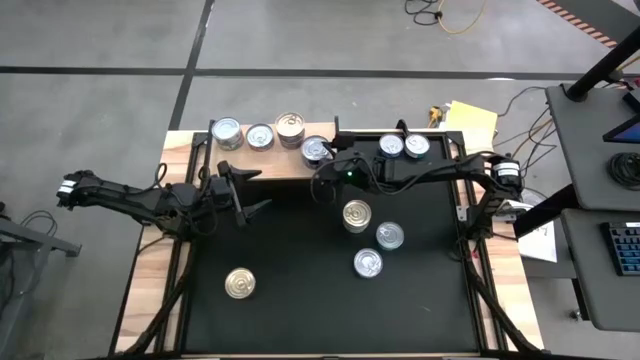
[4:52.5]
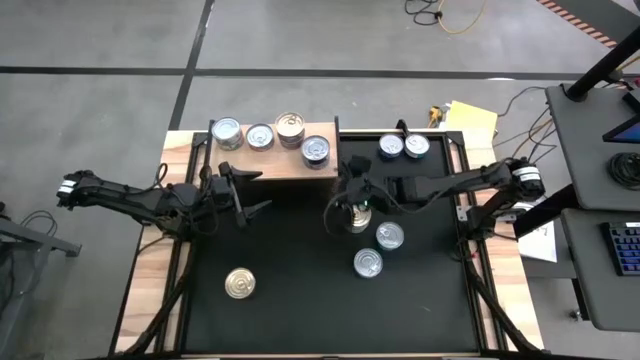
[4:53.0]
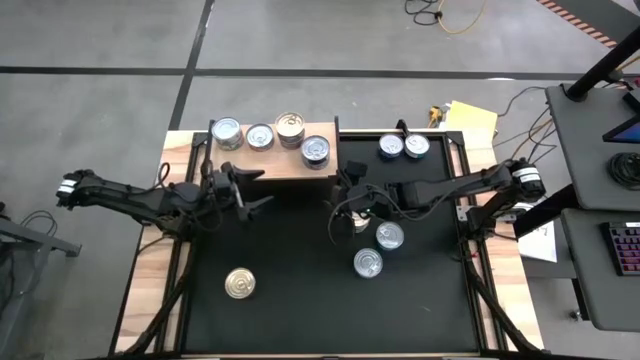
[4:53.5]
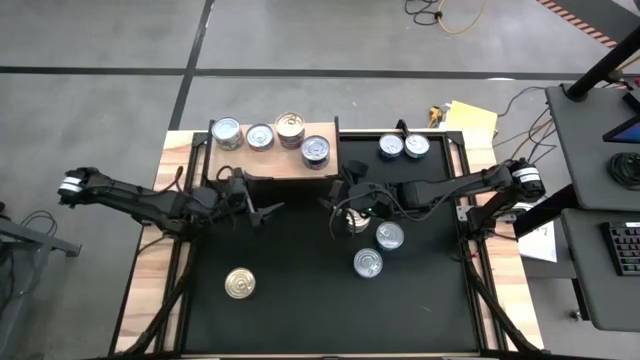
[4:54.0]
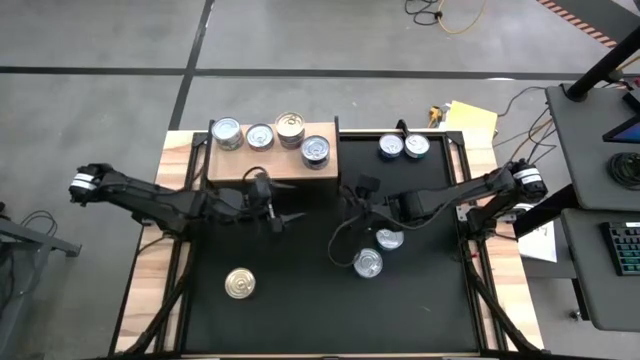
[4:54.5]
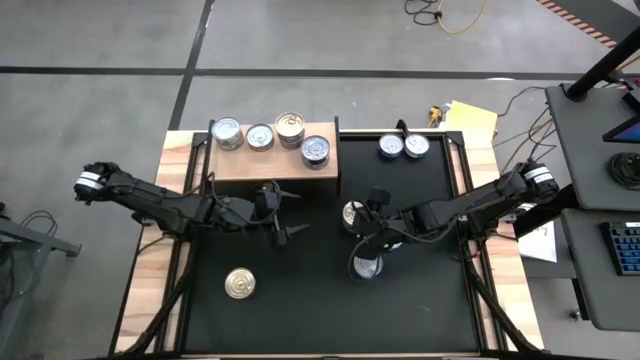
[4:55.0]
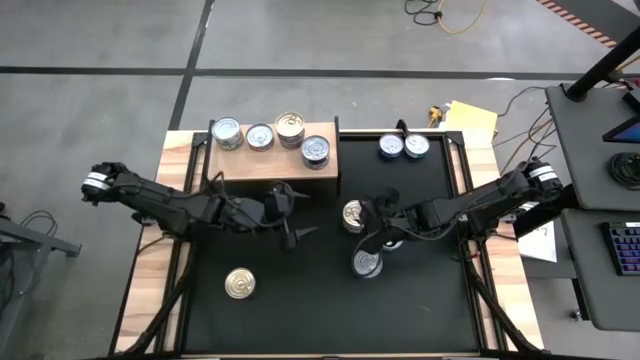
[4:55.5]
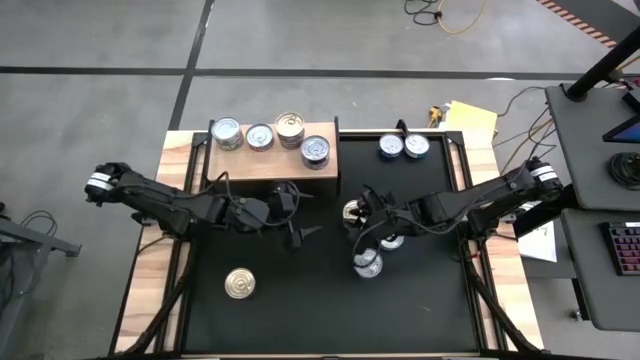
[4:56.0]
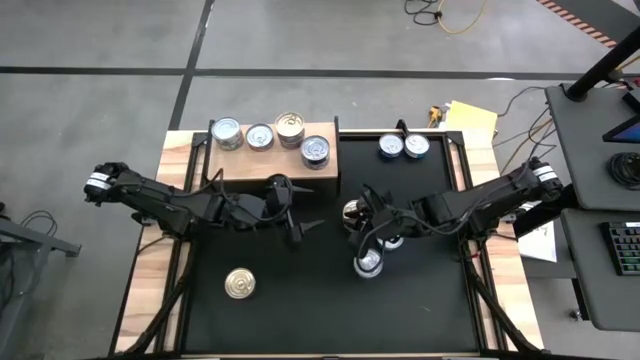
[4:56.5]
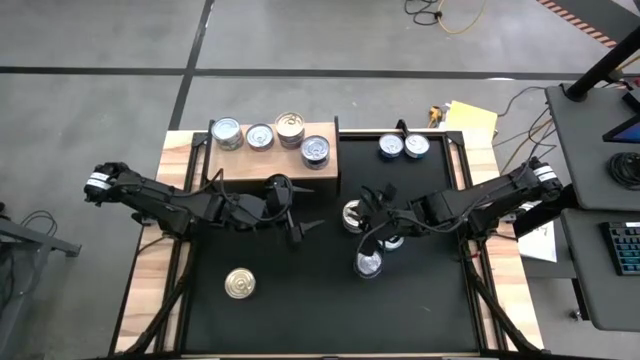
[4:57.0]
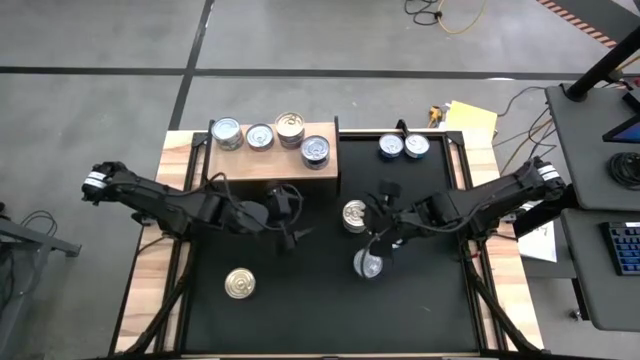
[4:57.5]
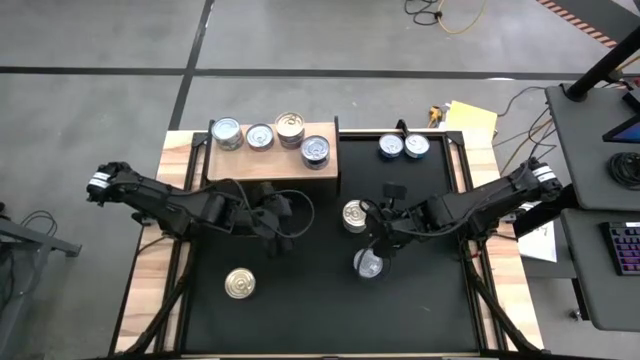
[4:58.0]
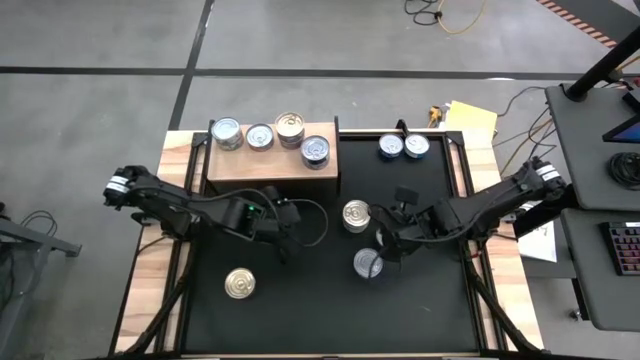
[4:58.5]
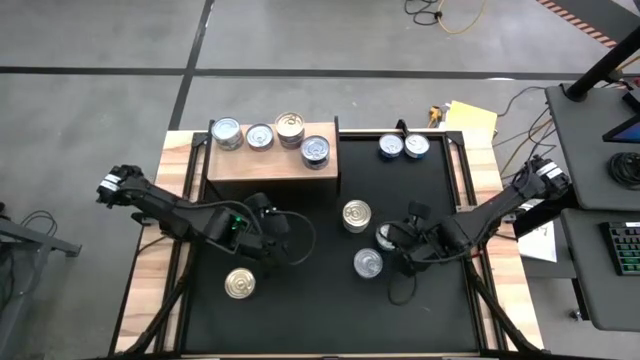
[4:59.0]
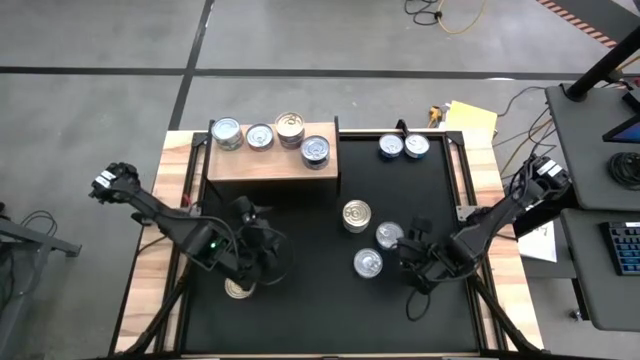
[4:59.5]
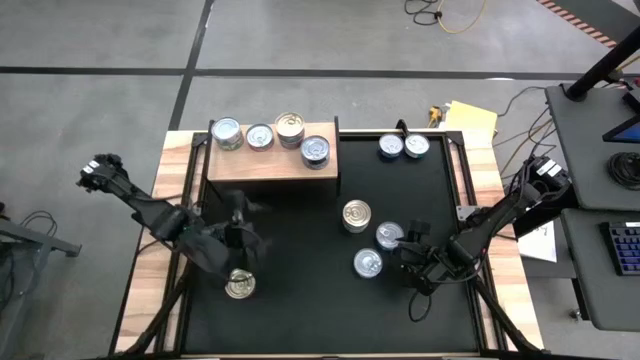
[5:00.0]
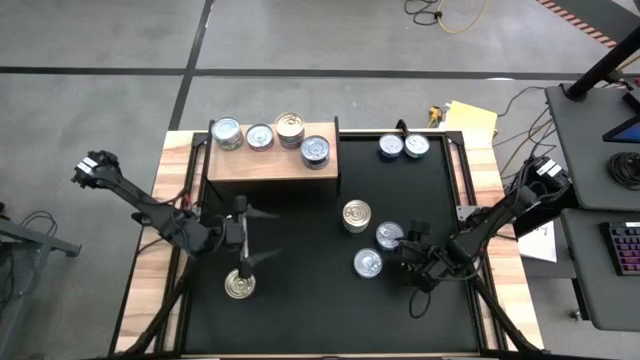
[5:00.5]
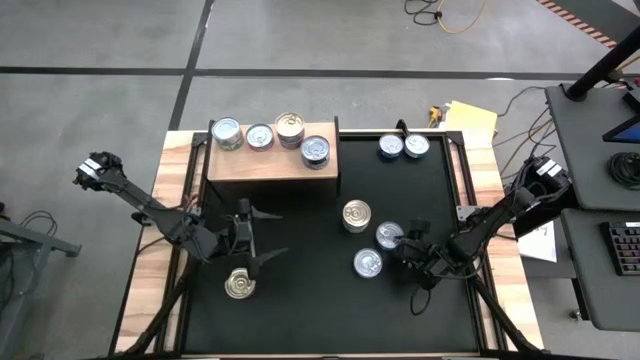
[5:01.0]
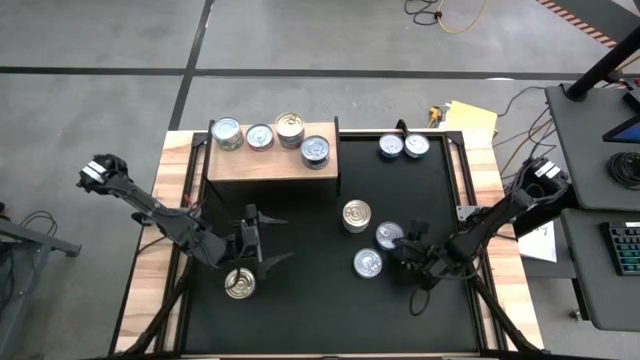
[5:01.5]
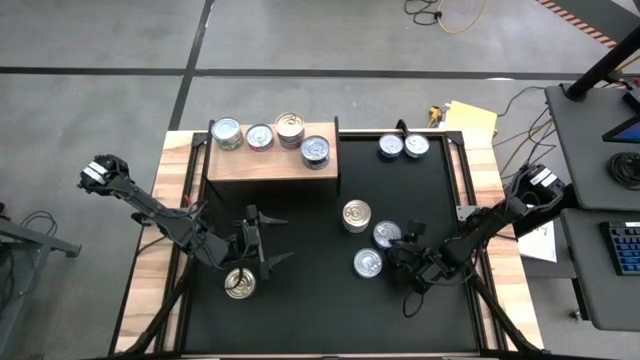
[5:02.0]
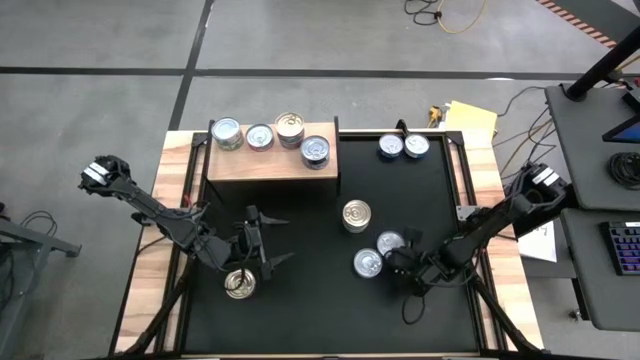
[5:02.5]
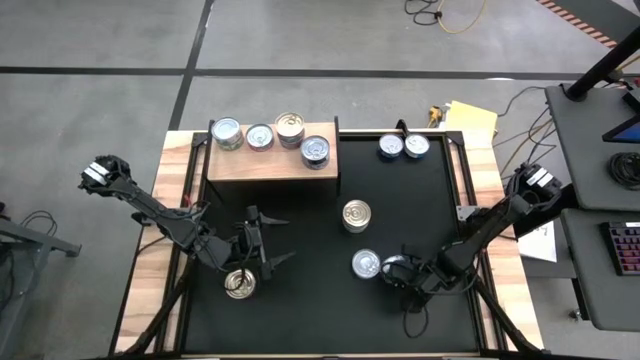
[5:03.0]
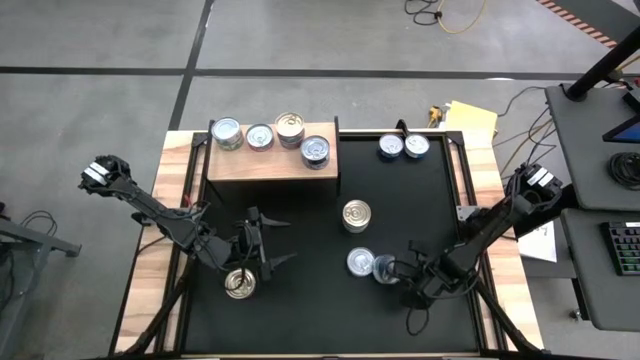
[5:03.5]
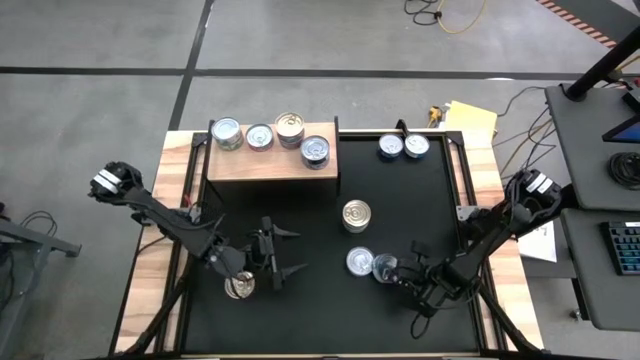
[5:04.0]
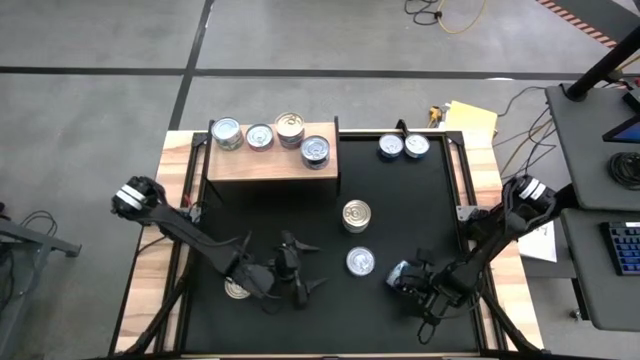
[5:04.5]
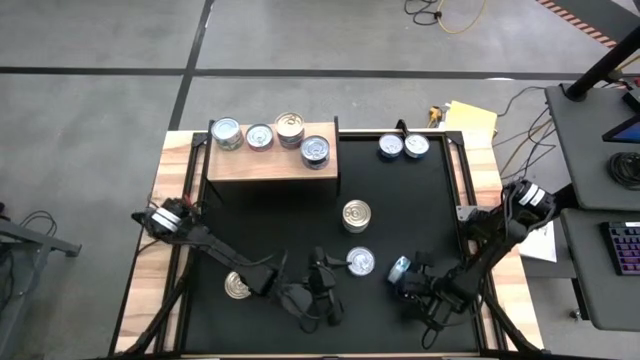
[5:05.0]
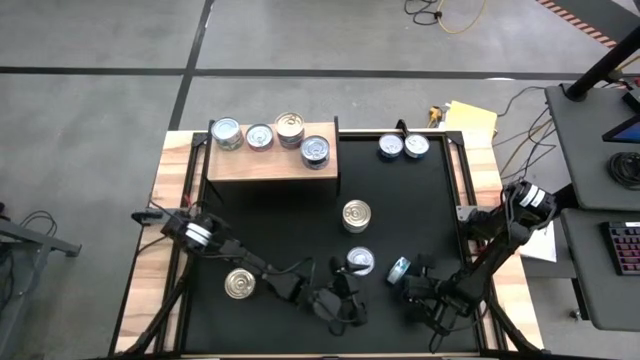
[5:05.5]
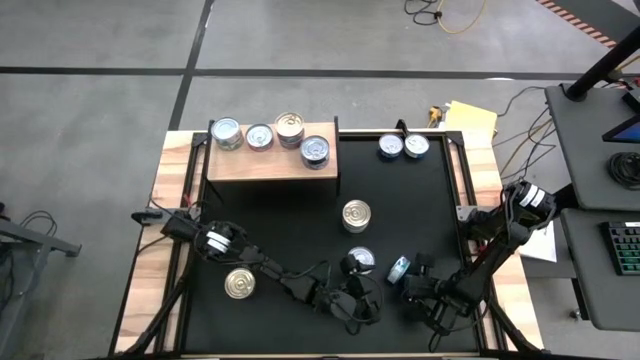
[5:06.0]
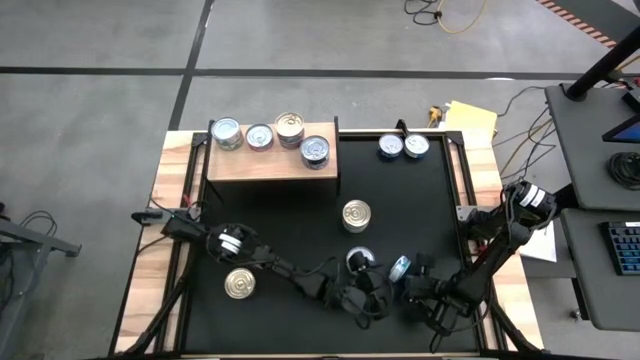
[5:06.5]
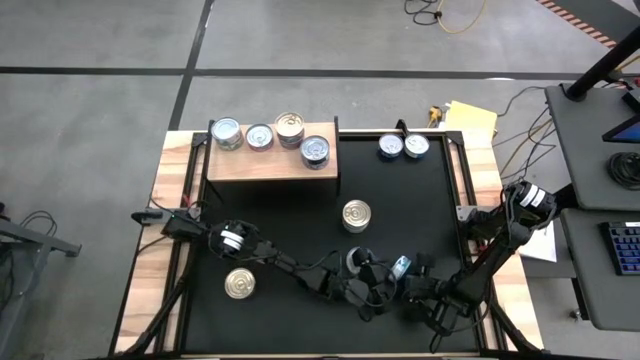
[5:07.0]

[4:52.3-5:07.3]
Task: Stack canned seafood by type on shelf
Put the green/blue tuna can on the shelf

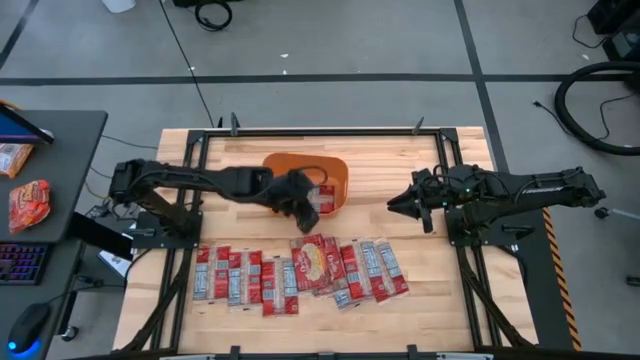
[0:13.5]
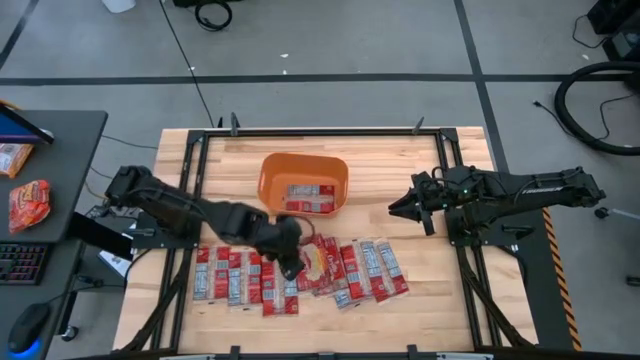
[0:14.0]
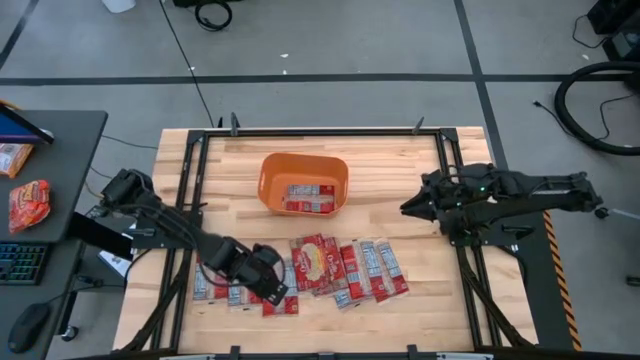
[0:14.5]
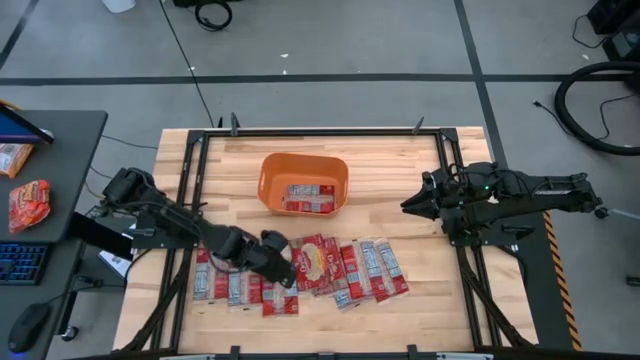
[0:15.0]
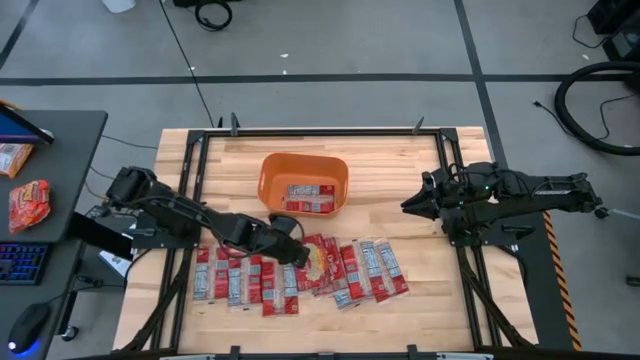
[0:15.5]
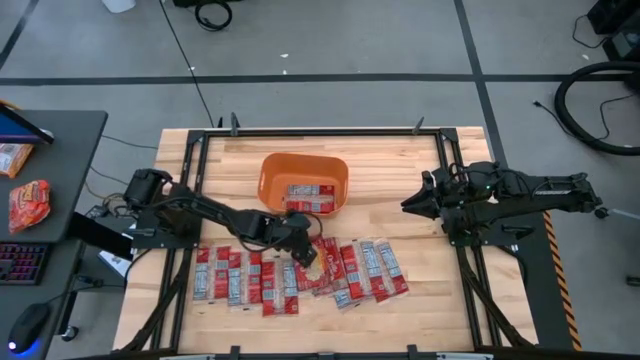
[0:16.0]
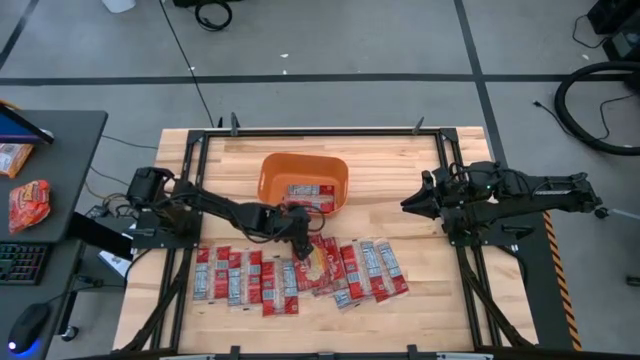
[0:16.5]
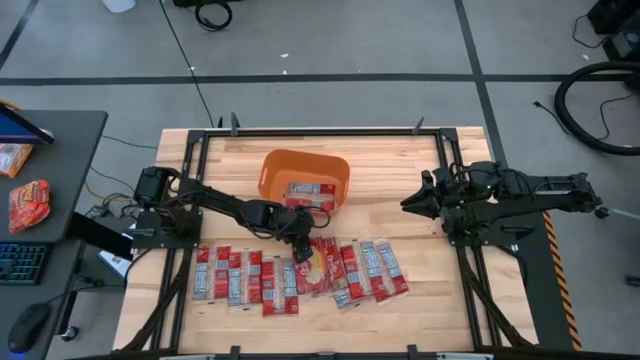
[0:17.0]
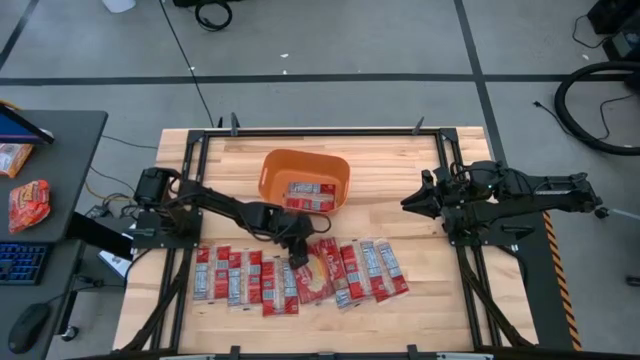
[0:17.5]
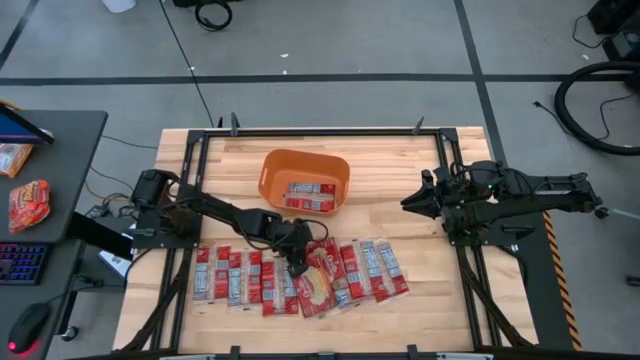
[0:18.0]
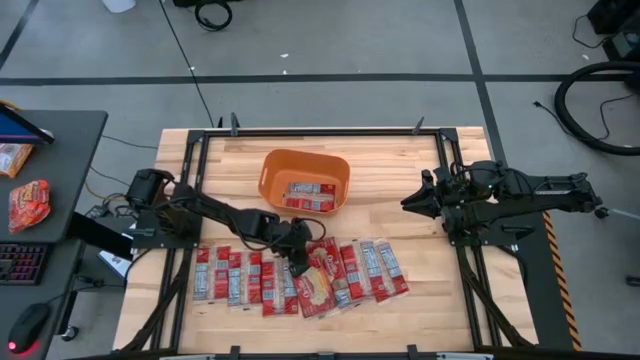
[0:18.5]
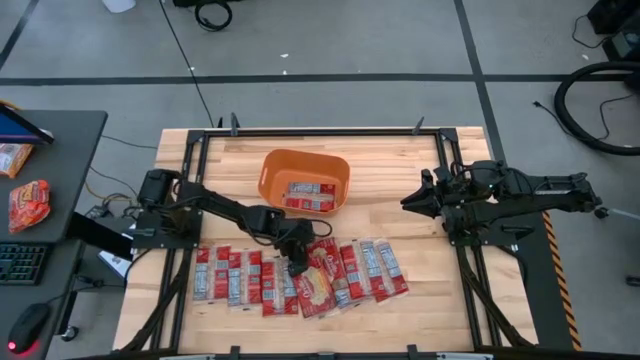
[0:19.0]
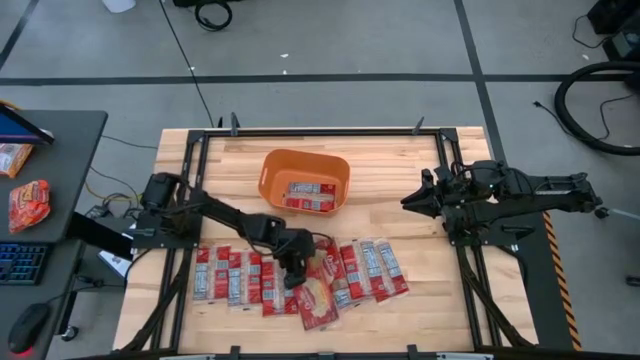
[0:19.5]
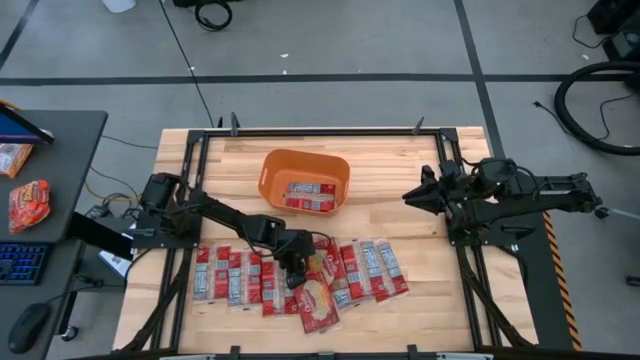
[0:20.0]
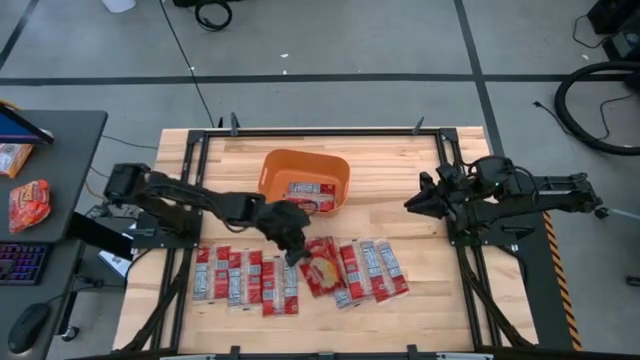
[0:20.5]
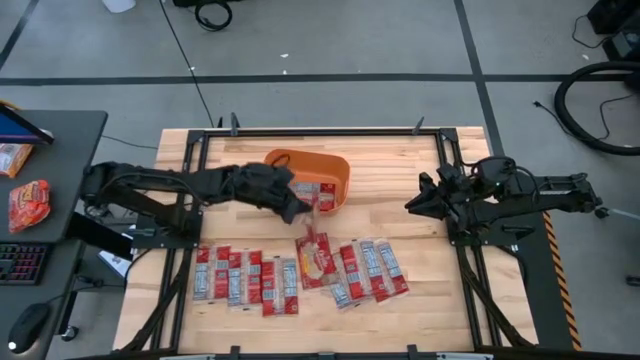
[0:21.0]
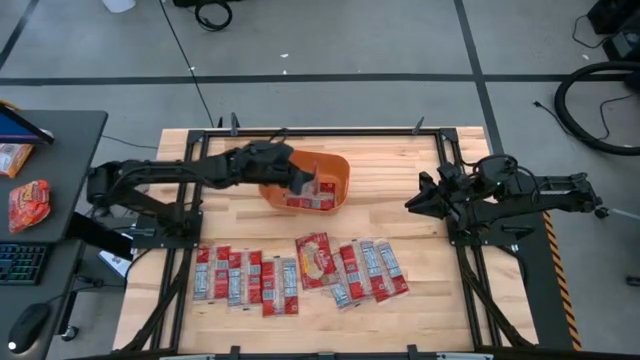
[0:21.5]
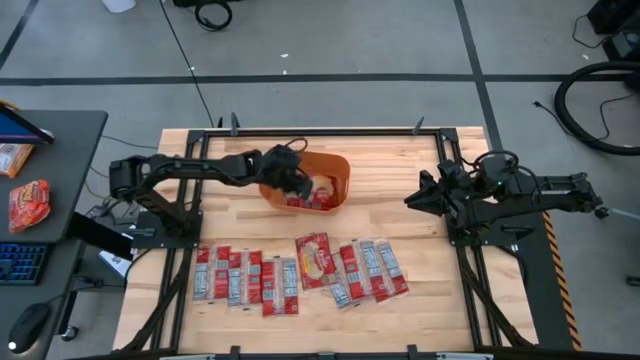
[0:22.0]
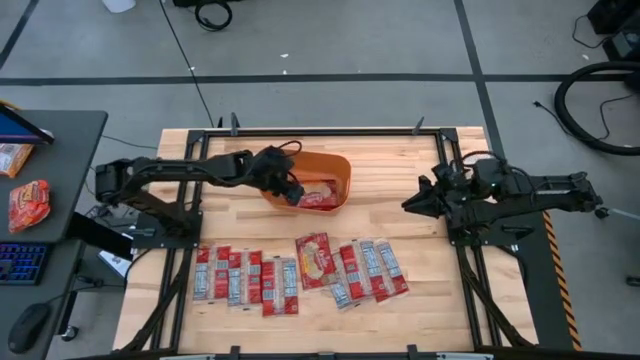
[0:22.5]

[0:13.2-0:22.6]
Task: Sort popcorn bags into baskets
Put the red popcorn bag into the orange bin
